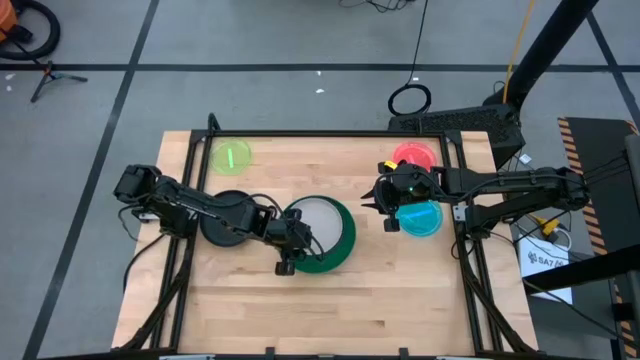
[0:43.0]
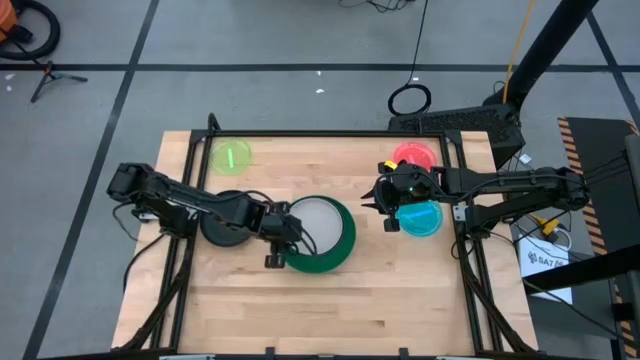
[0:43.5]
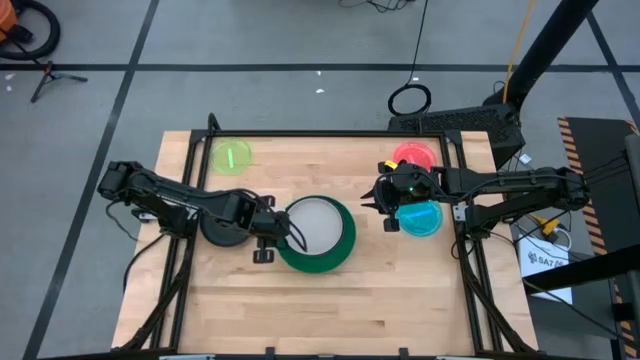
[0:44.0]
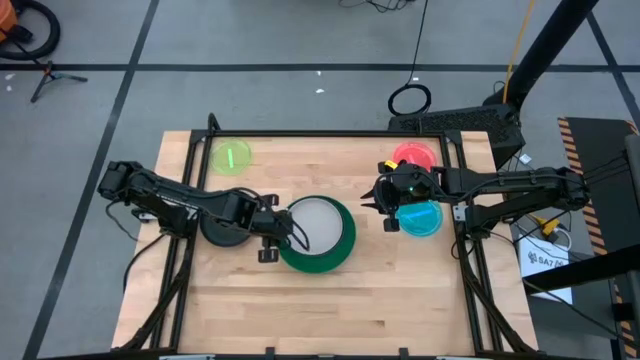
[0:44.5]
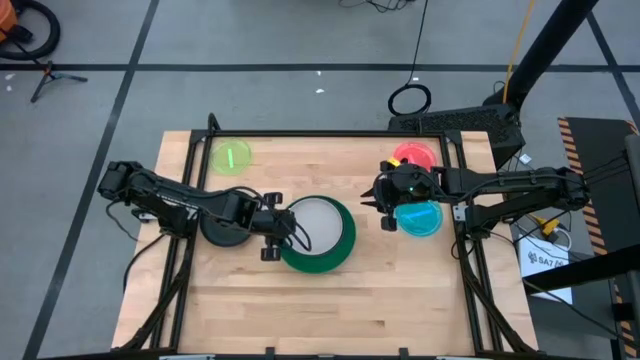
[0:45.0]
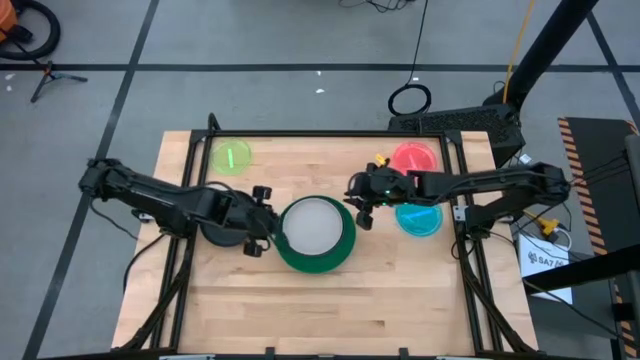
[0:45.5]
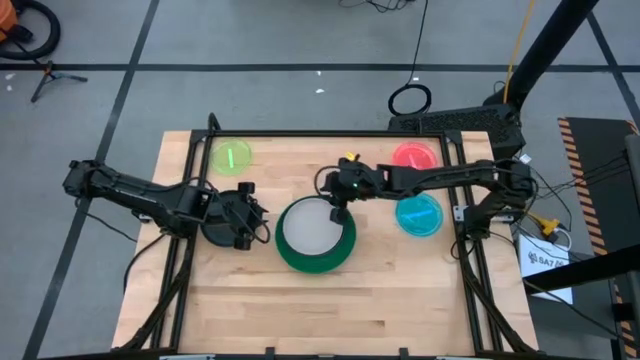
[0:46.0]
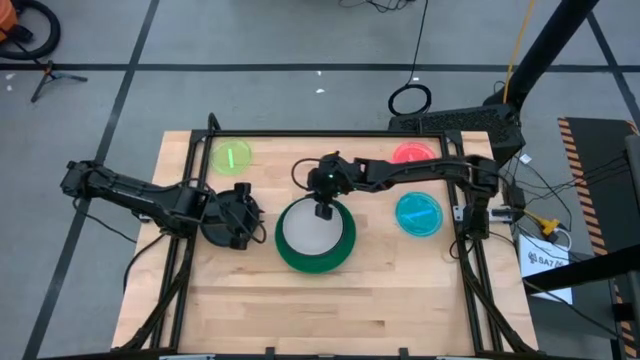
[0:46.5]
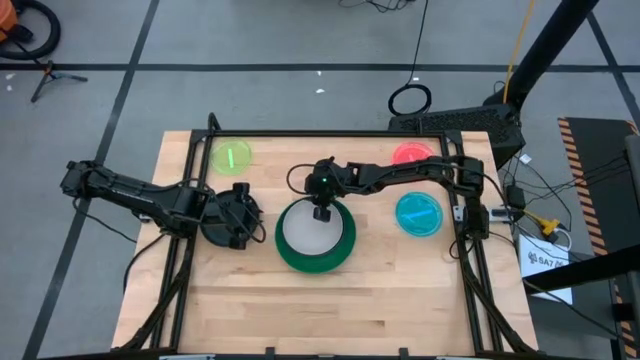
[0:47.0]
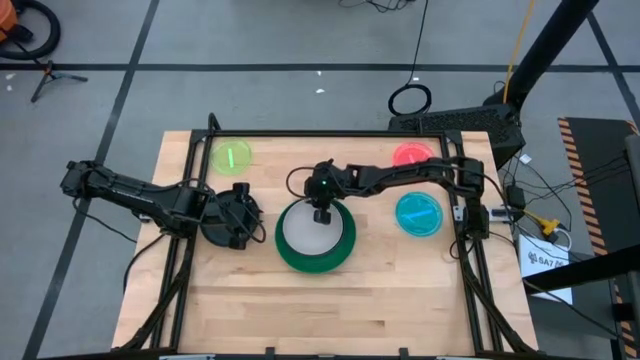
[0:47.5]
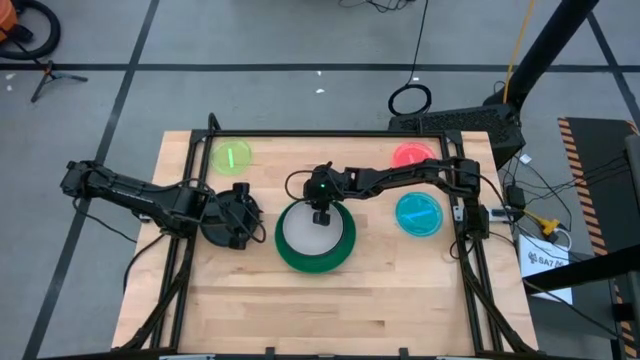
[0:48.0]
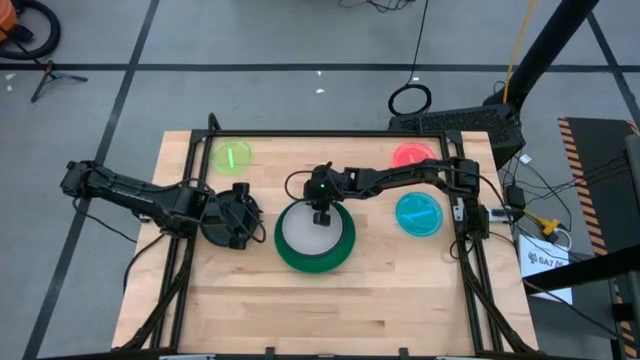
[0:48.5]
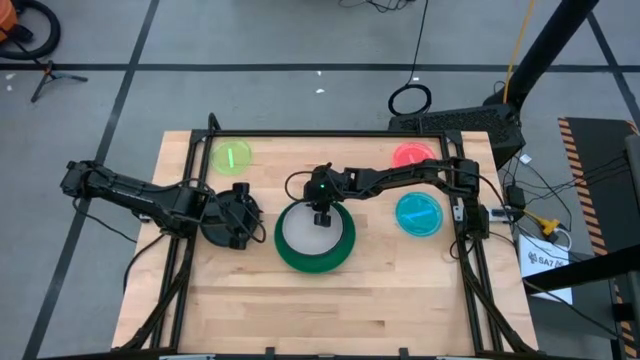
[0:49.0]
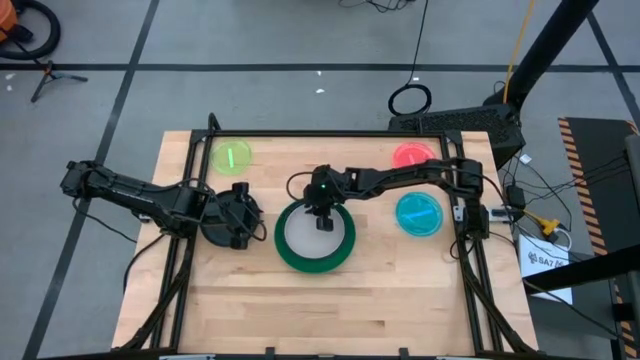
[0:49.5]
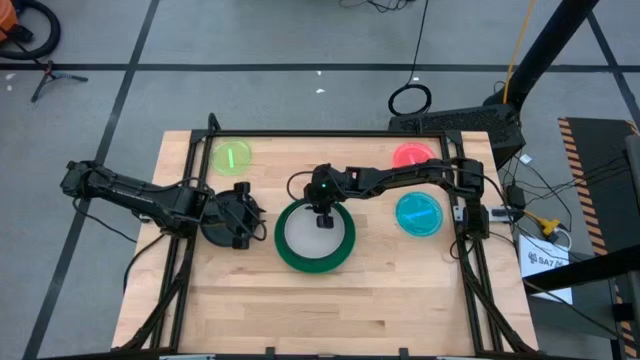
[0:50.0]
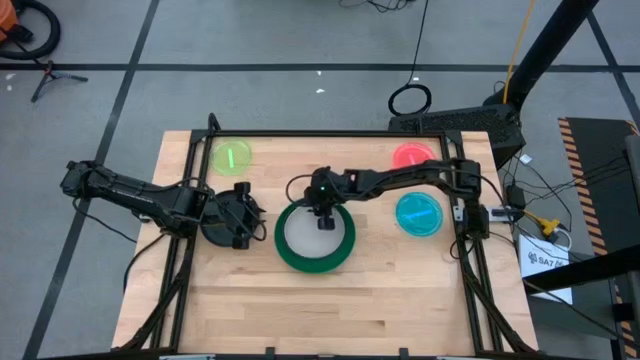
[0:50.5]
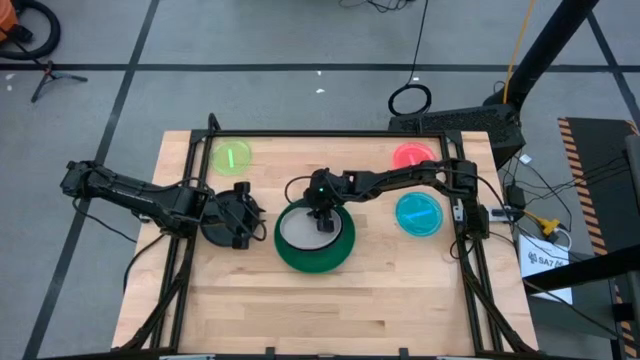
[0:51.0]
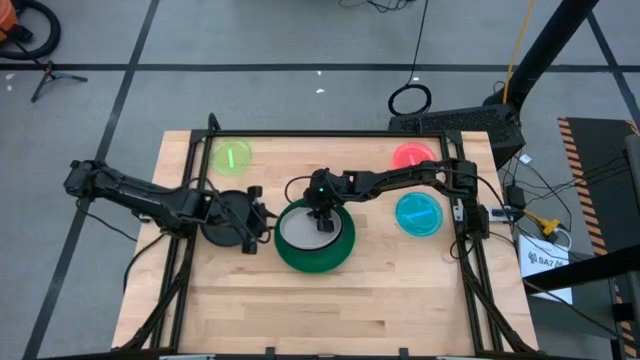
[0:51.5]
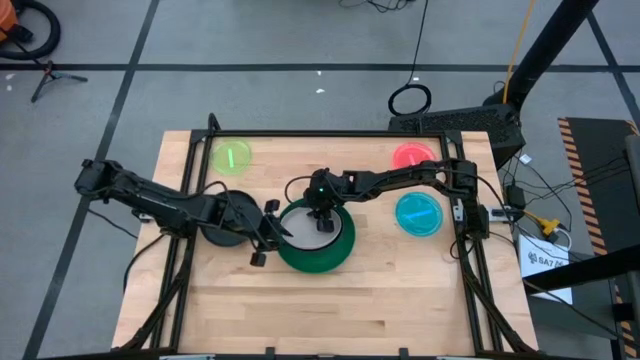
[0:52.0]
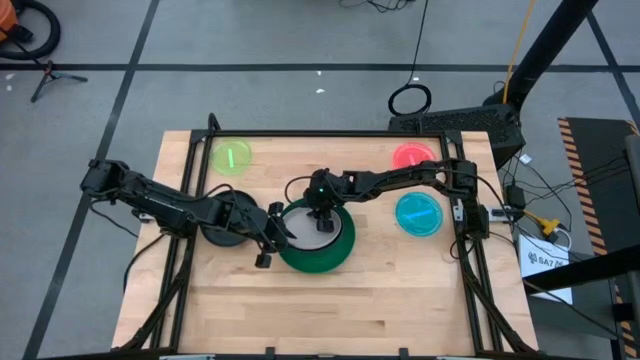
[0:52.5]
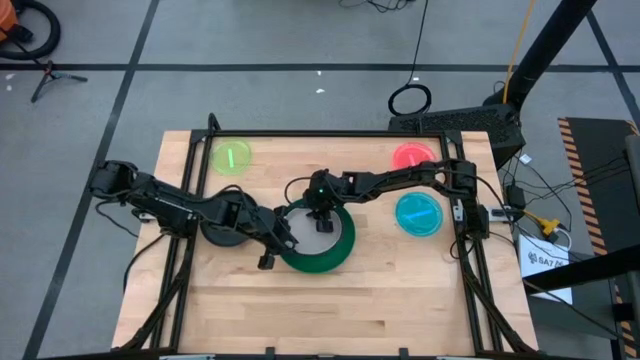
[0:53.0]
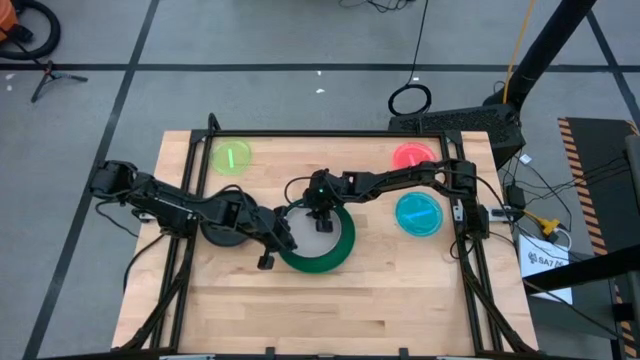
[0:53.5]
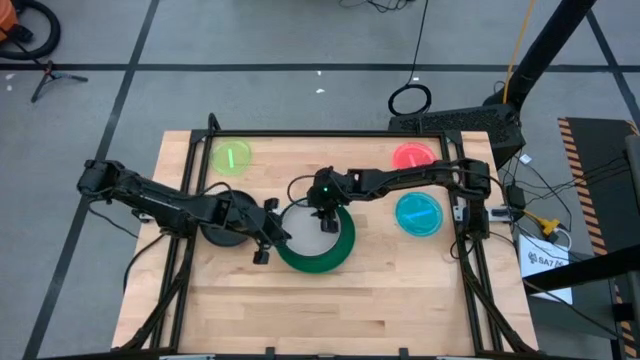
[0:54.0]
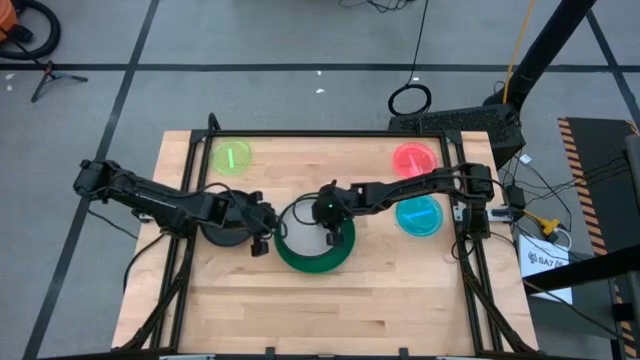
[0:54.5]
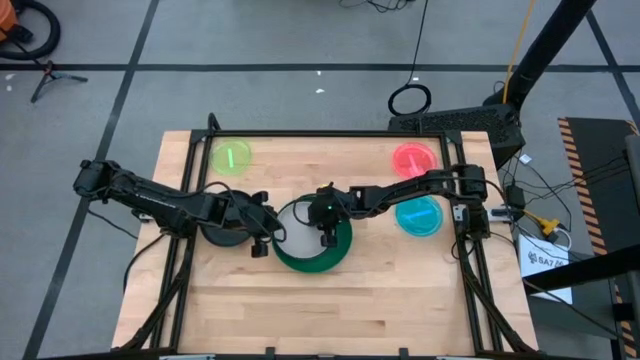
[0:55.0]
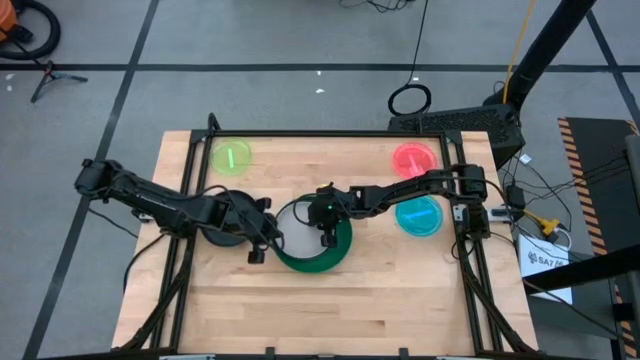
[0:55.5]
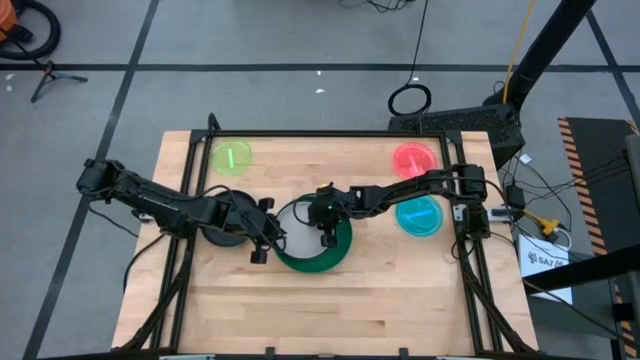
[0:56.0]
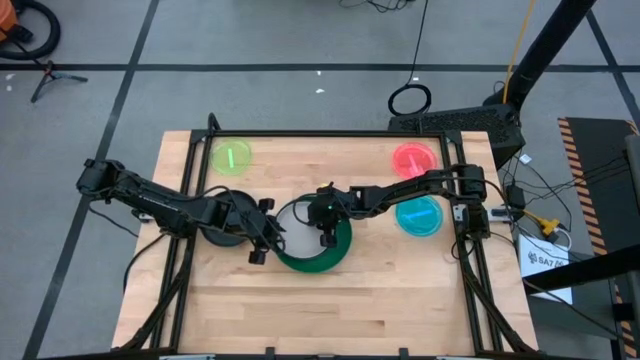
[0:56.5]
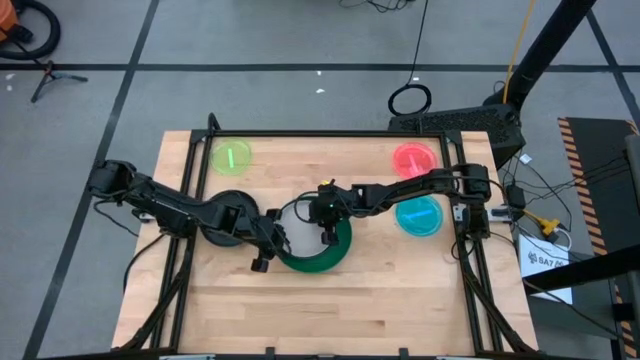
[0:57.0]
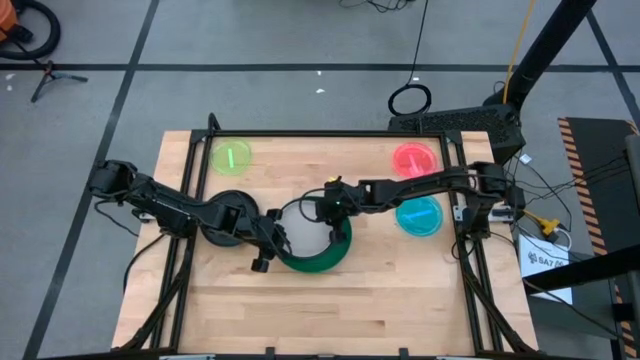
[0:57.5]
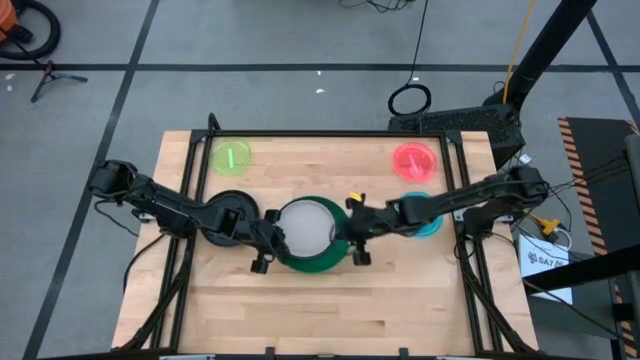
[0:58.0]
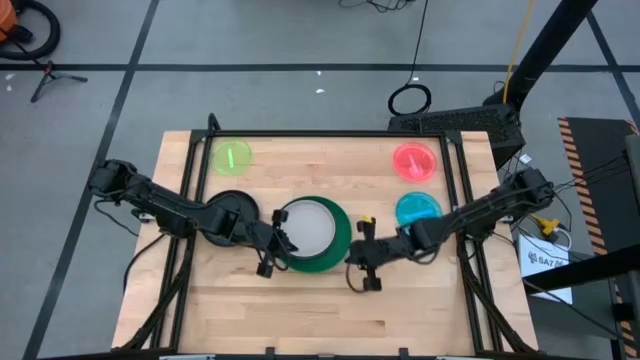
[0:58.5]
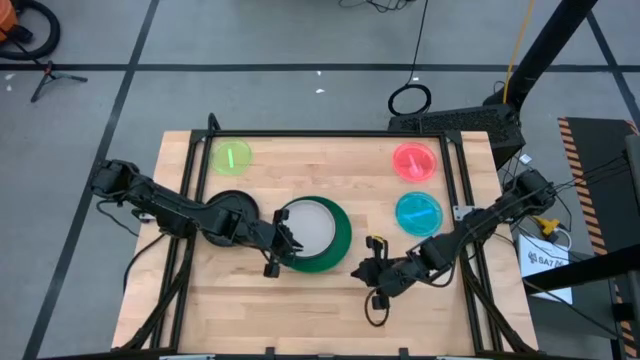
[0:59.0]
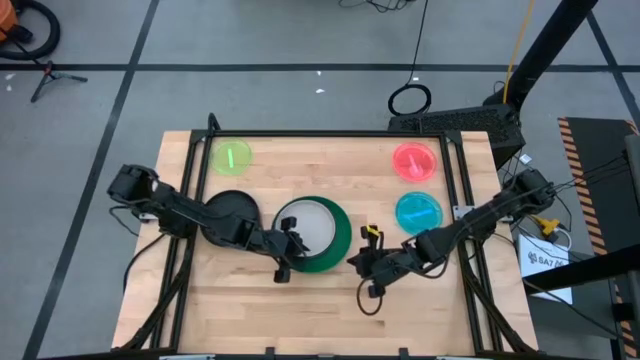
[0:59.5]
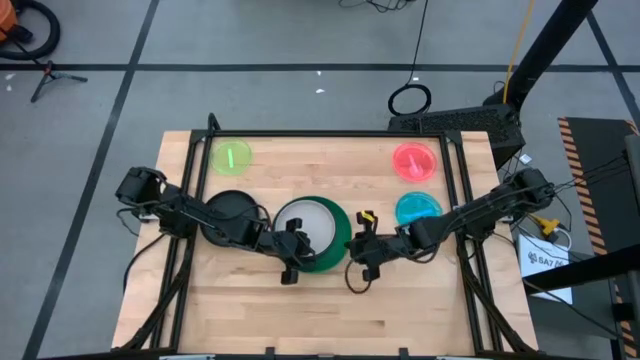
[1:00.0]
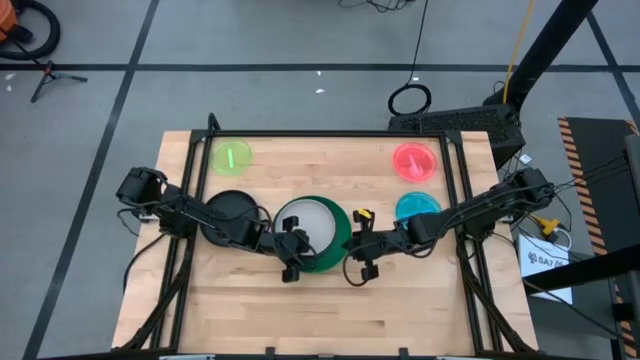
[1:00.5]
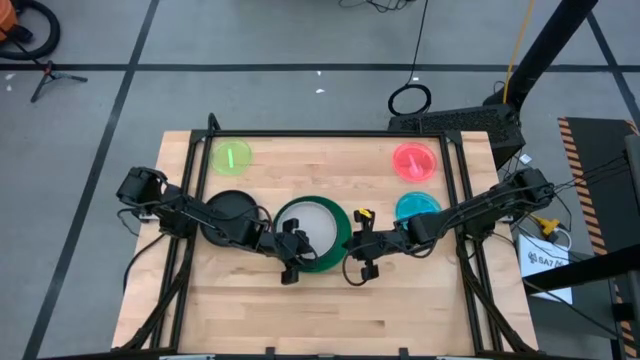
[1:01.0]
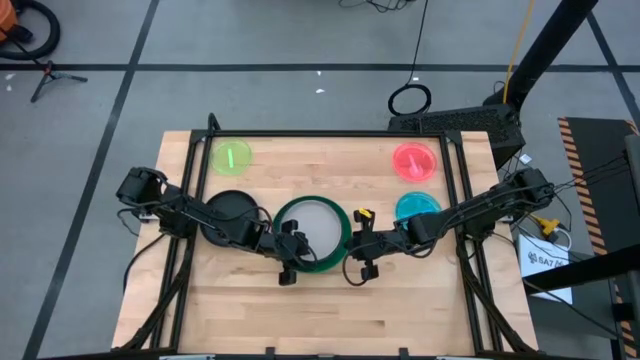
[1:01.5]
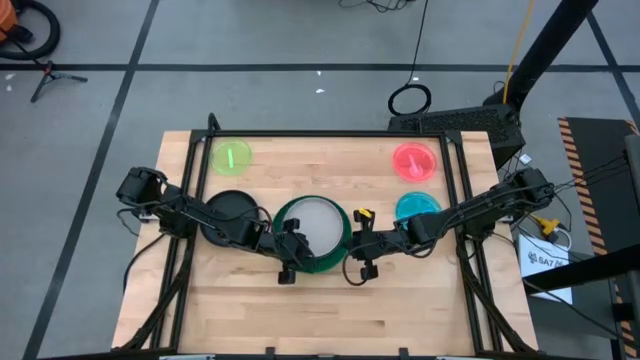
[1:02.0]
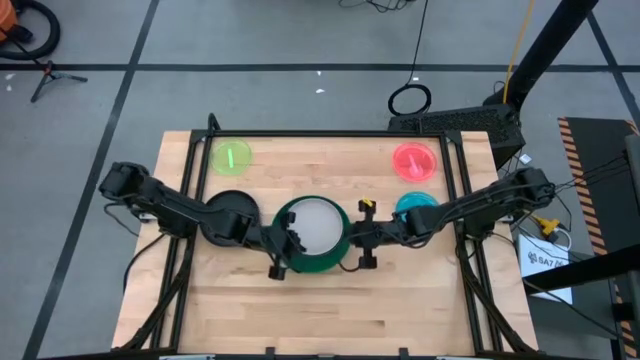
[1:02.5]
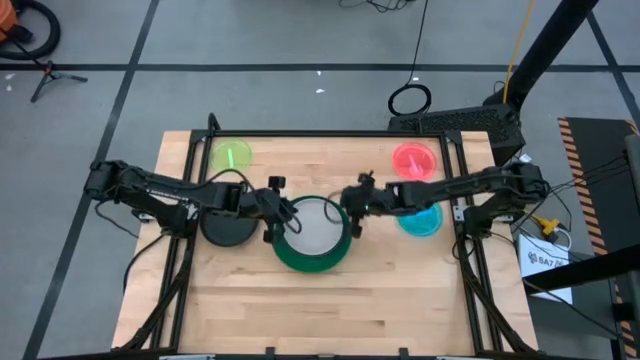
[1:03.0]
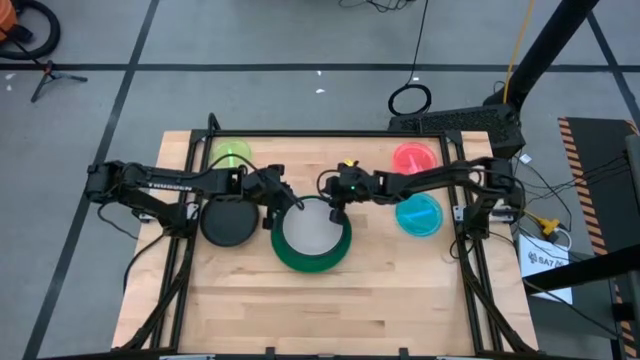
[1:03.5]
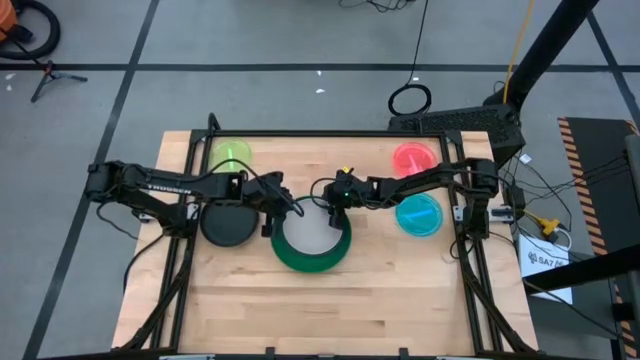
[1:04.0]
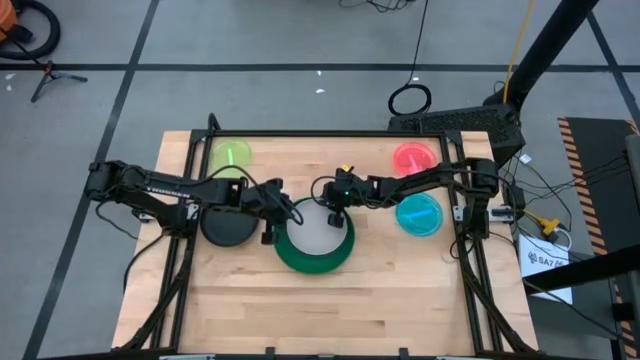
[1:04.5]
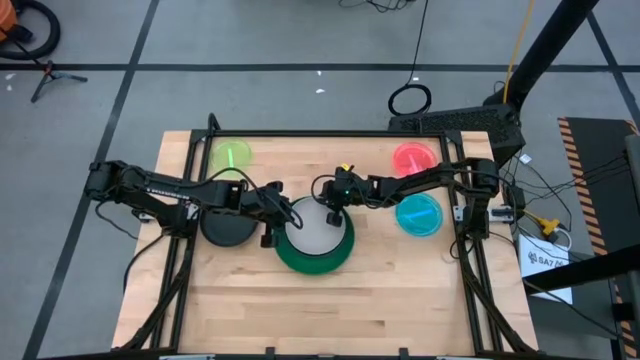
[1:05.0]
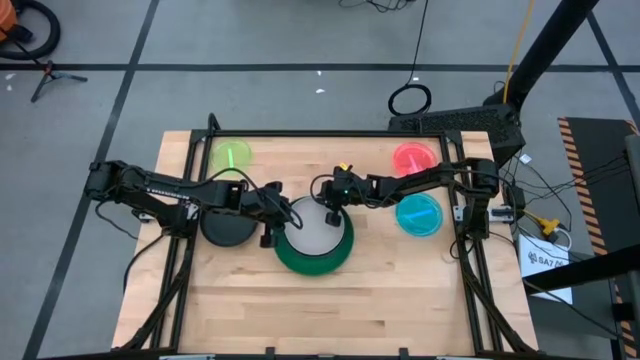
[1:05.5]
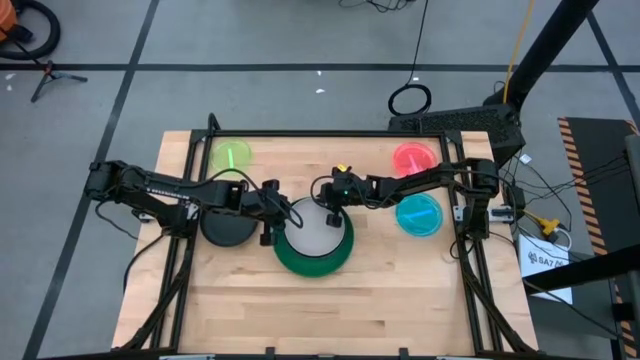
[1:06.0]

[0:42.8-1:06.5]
Task: Stack plastic plates
Remove the white plate from the stacked plates
